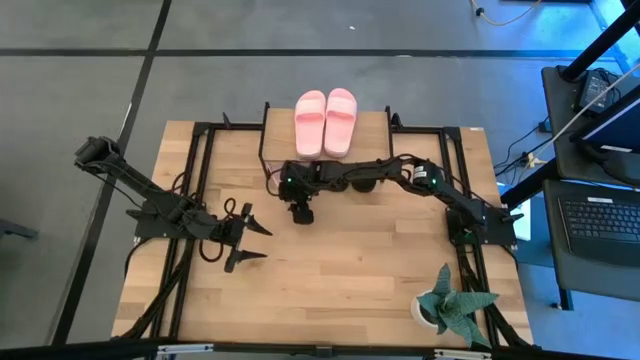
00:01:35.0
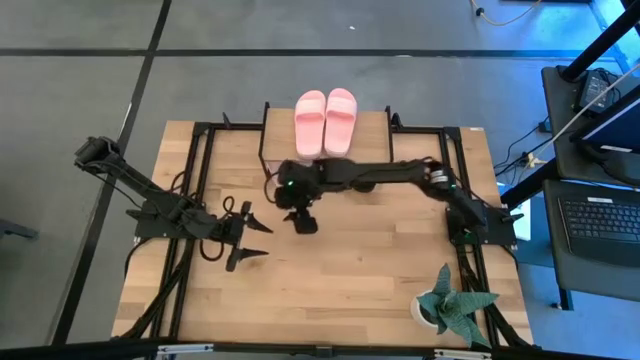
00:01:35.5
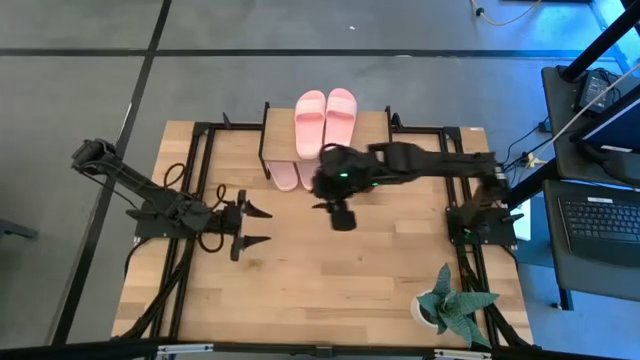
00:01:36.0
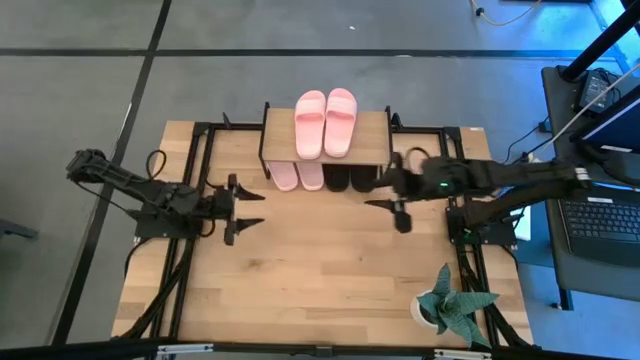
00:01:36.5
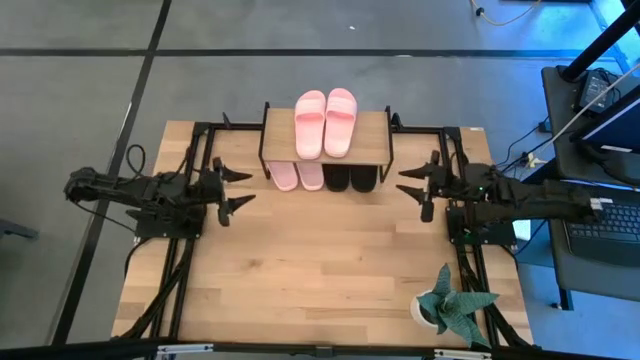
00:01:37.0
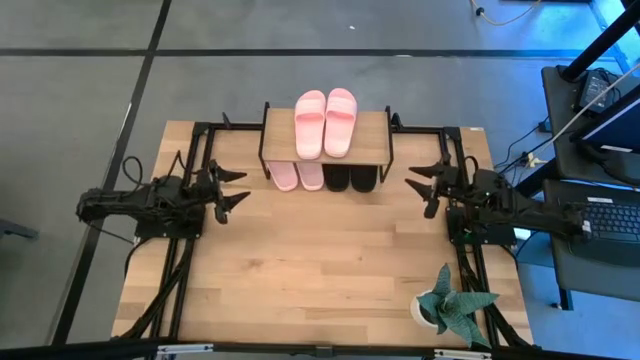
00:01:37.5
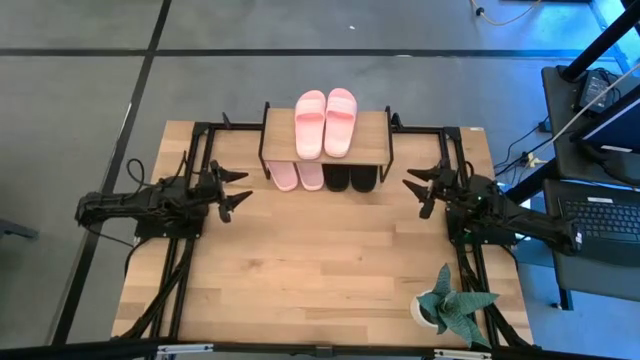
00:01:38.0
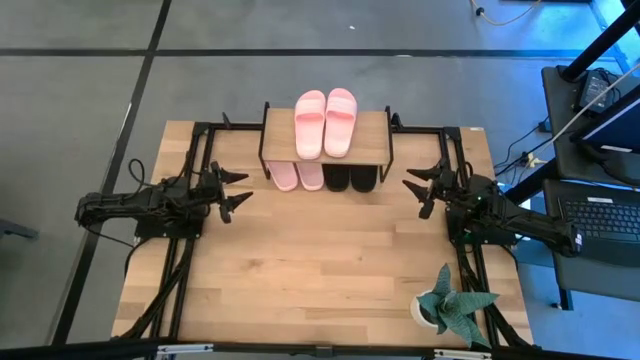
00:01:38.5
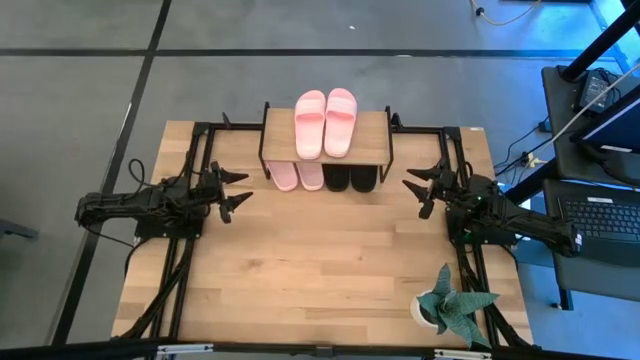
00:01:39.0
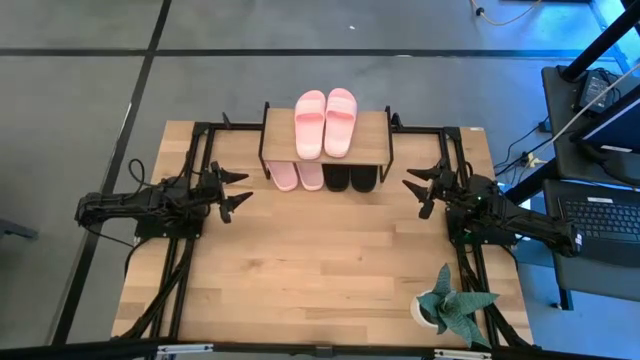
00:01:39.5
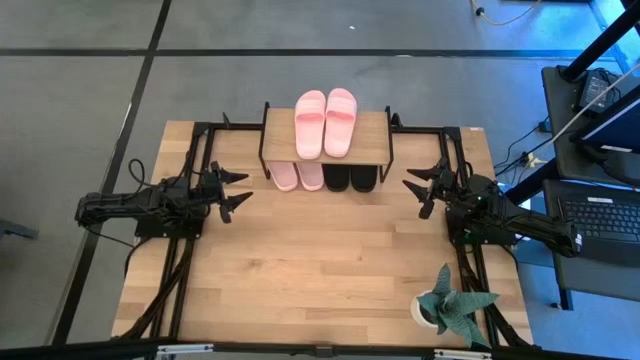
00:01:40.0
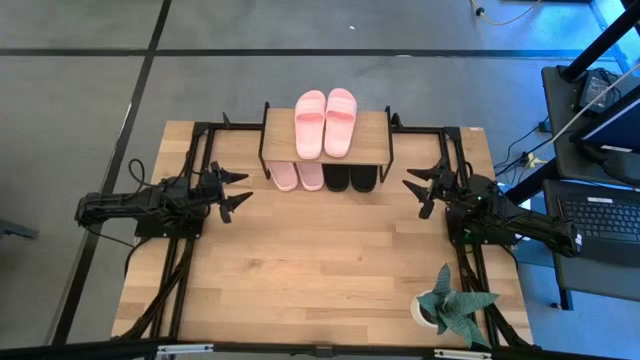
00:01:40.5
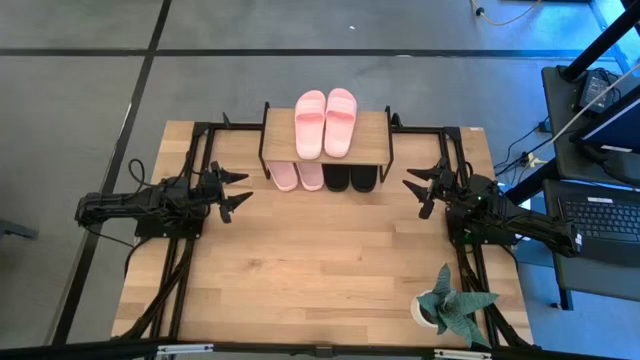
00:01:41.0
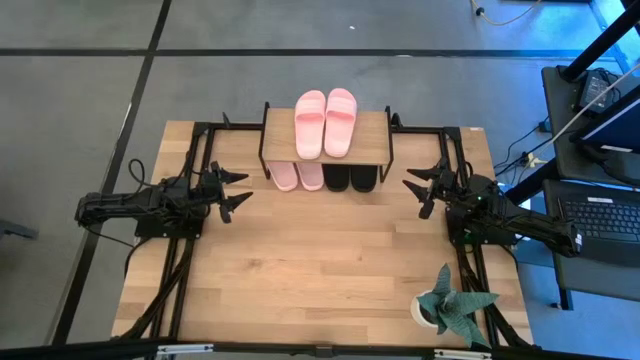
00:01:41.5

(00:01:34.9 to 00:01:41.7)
Task: Pick and place slides into the shelf
Return to Home Position

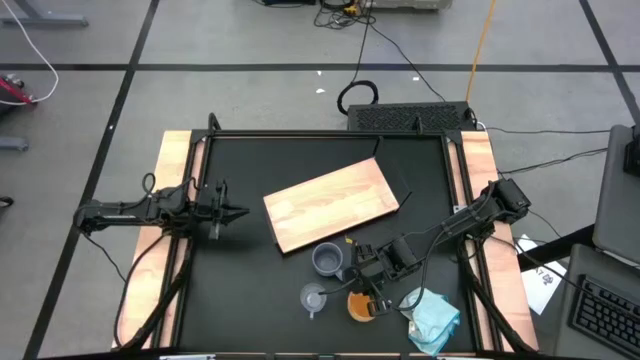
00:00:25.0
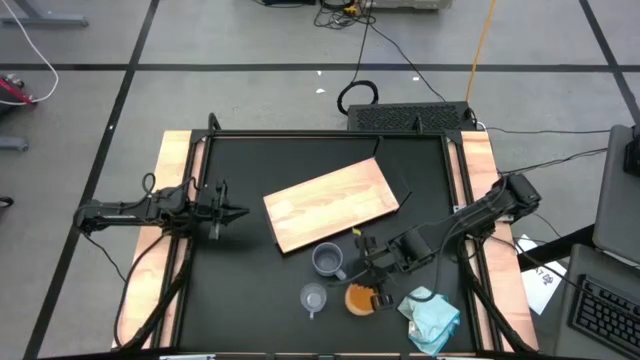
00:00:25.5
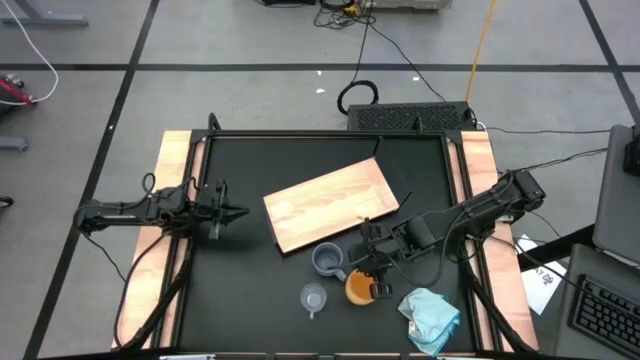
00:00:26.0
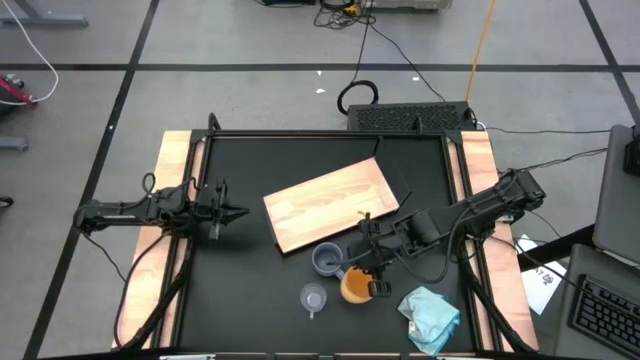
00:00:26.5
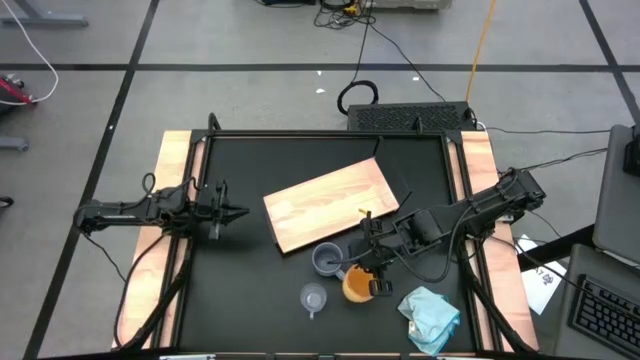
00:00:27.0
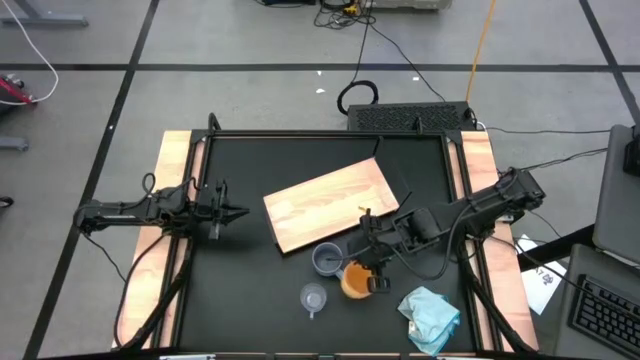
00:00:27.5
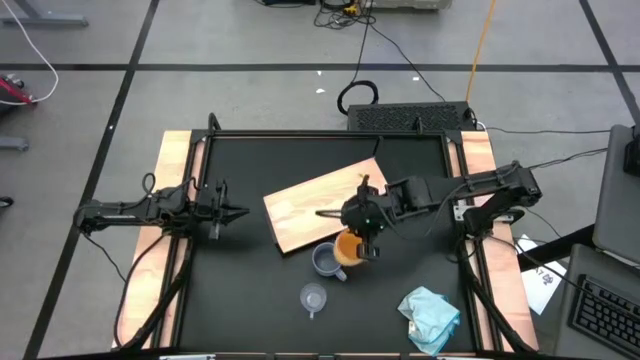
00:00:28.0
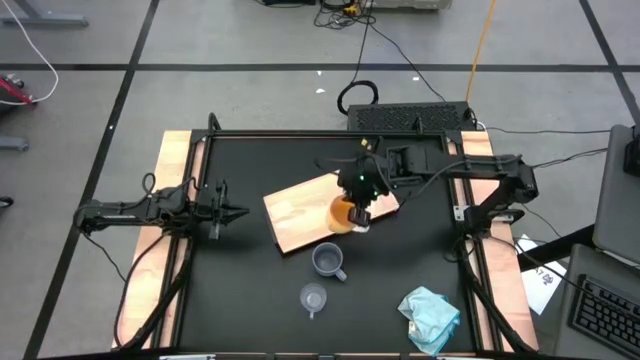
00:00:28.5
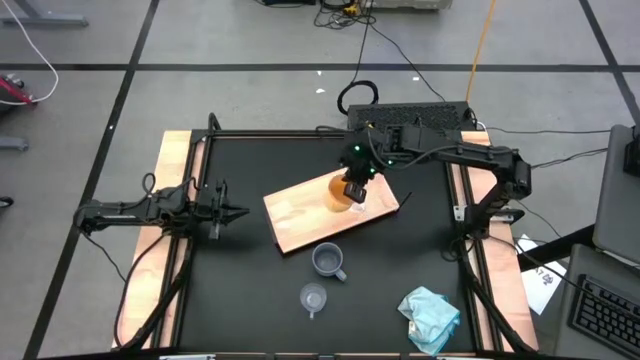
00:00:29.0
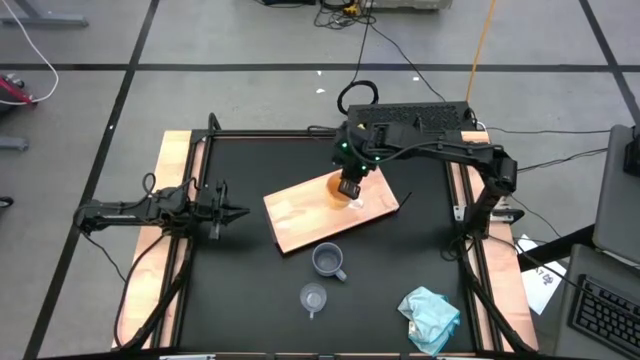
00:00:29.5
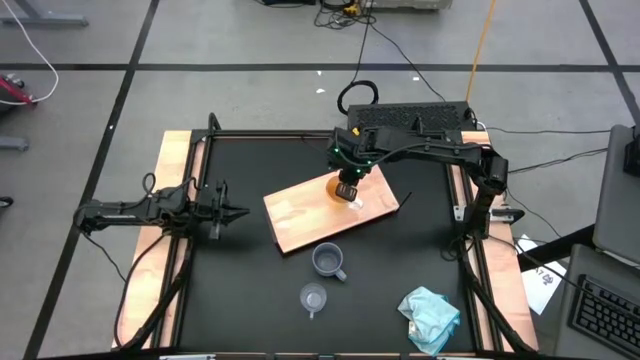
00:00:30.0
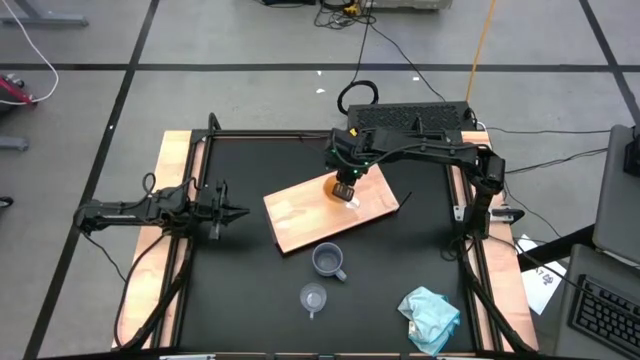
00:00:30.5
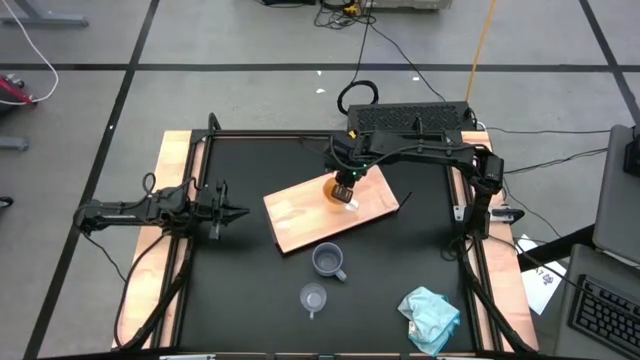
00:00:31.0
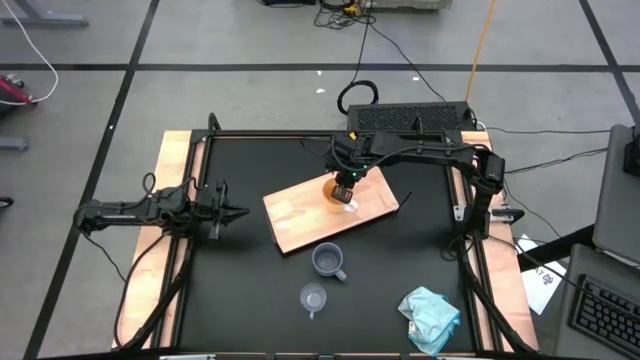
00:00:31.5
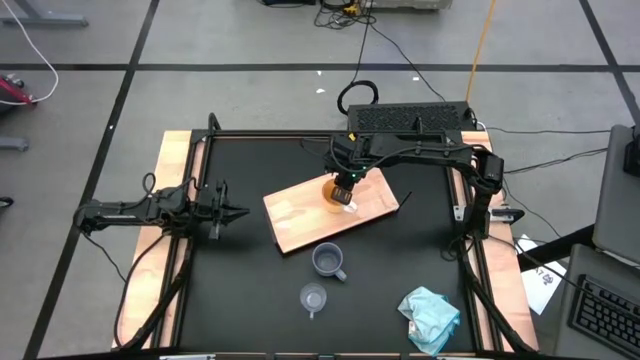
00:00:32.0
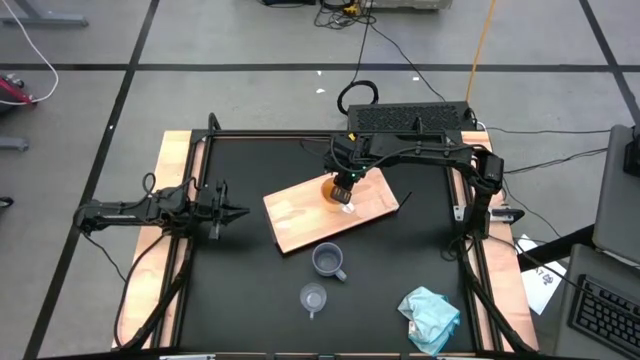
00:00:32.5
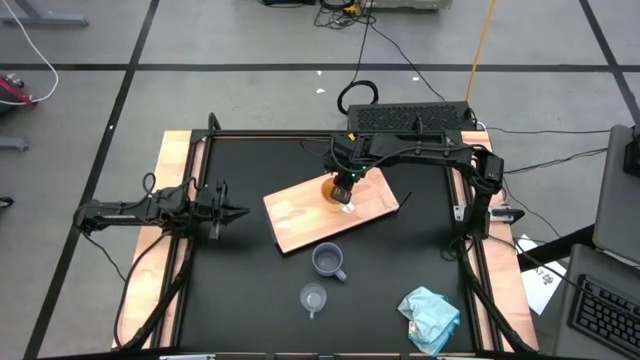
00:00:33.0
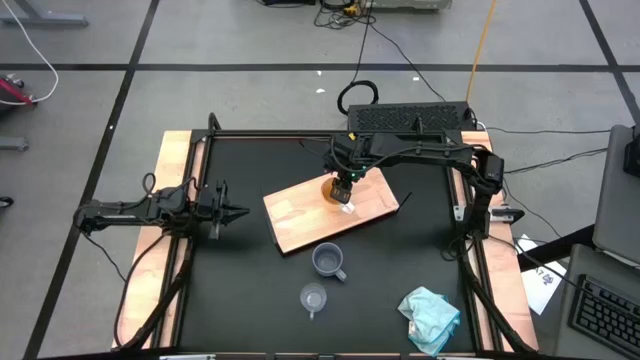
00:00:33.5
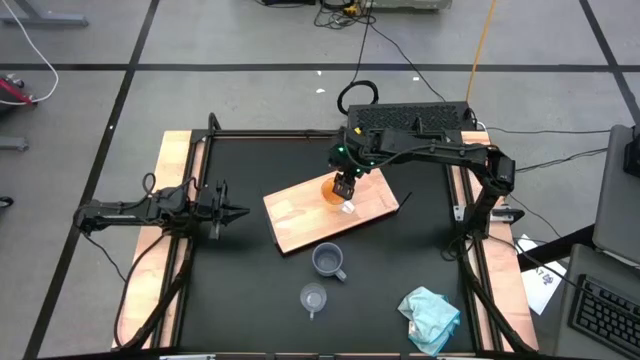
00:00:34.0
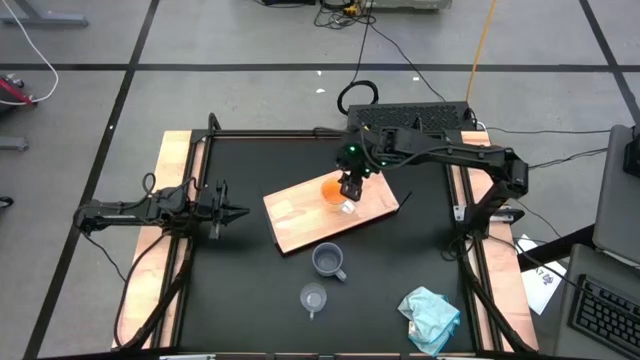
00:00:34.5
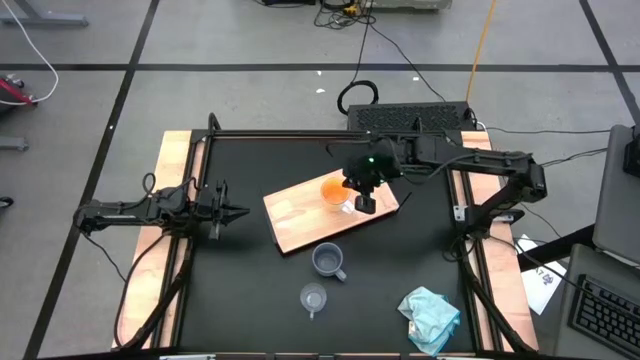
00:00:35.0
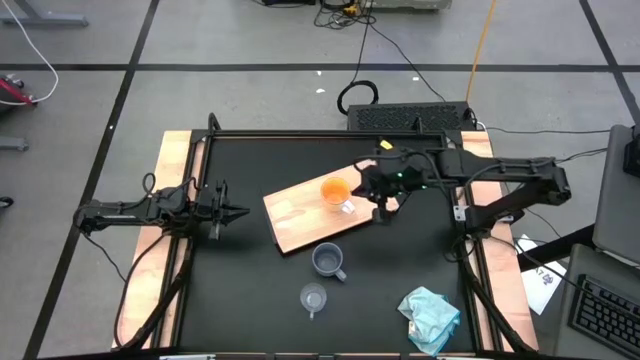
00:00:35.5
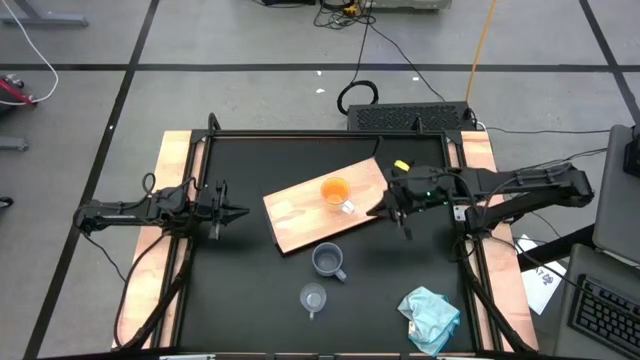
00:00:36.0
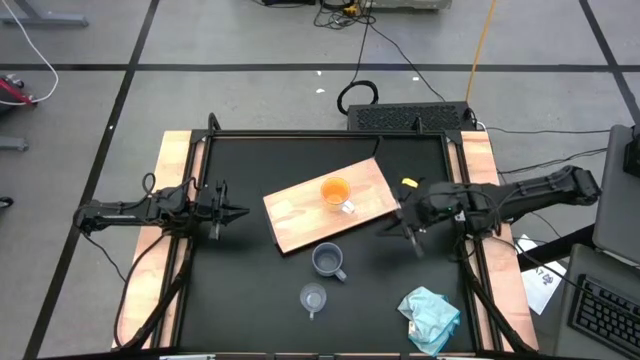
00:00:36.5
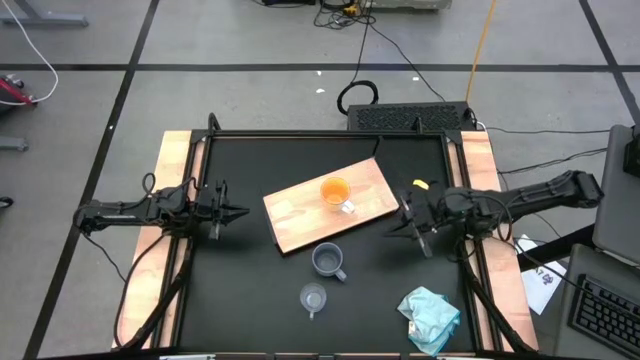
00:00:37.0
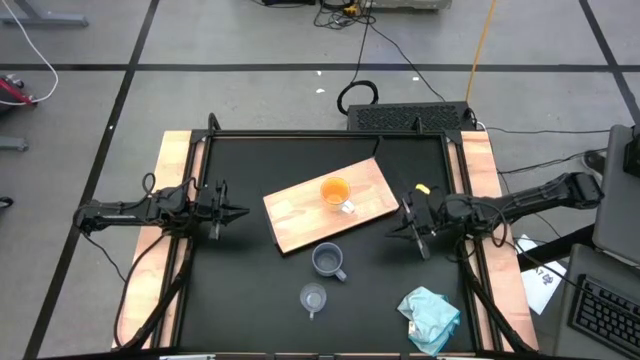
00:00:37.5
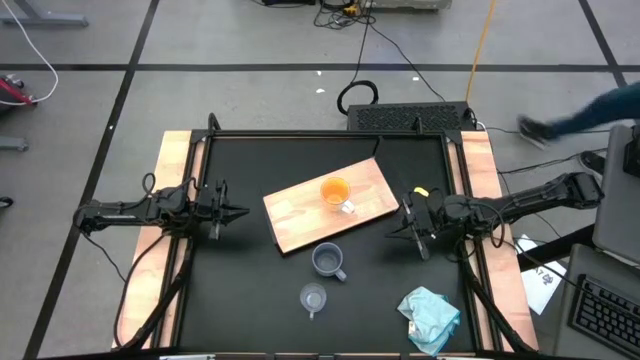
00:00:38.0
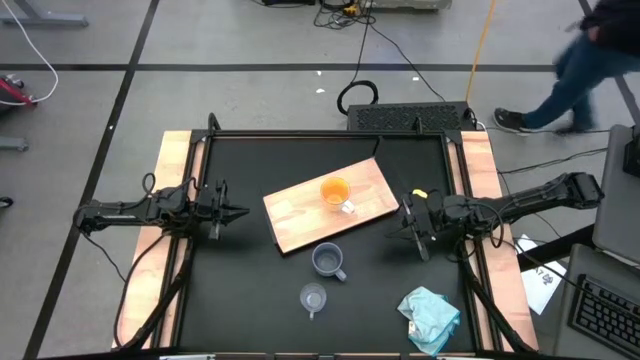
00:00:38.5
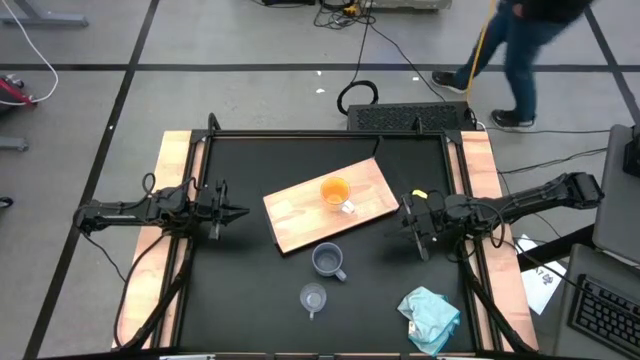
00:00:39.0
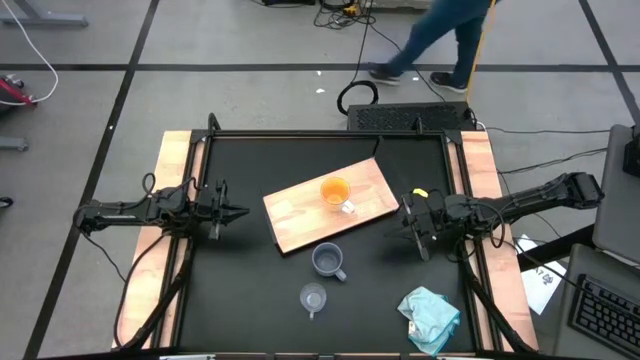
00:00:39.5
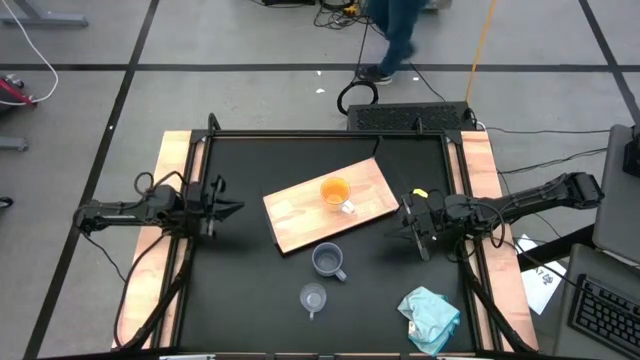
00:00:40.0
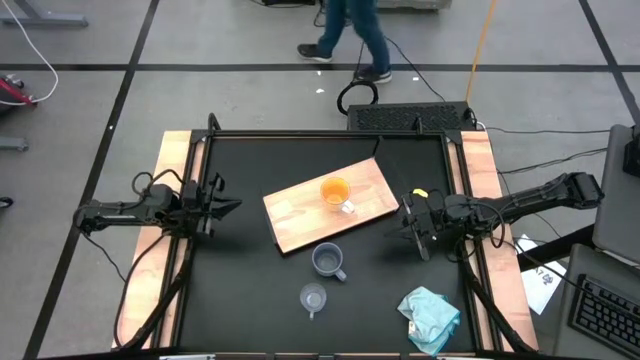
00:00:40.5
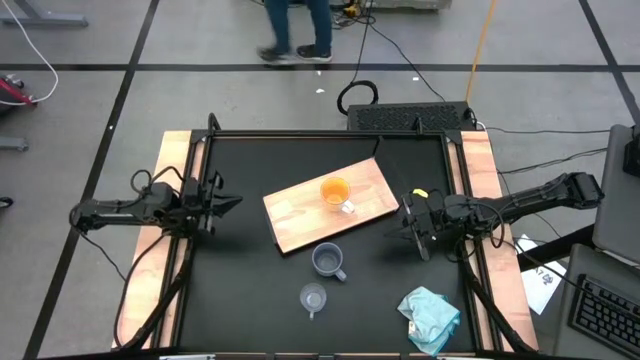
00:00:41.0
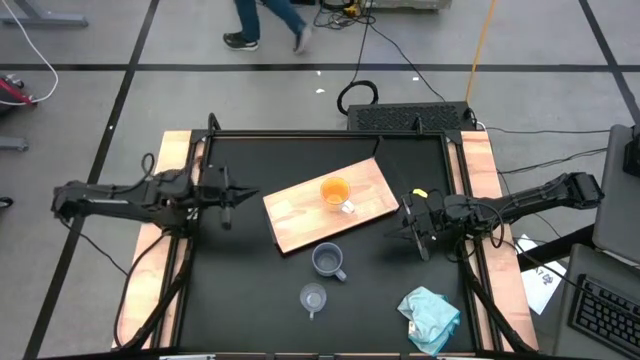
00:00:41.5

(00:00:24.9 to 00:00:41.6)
Task: Stack small to large cups/mugs on shelf
Put the orange mug on the shelf
